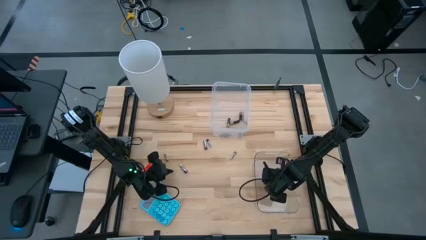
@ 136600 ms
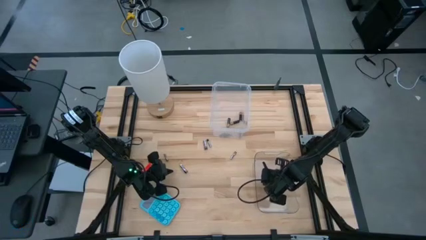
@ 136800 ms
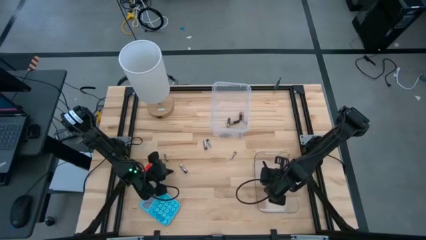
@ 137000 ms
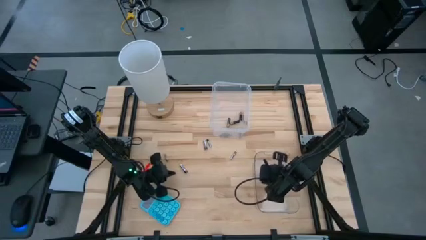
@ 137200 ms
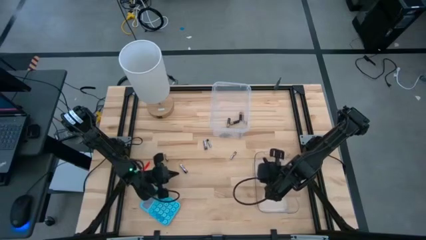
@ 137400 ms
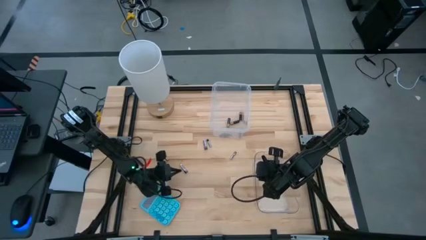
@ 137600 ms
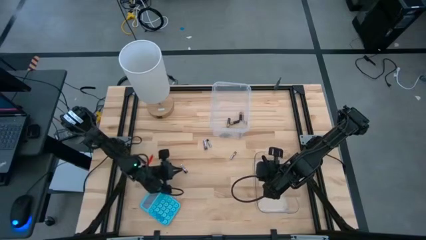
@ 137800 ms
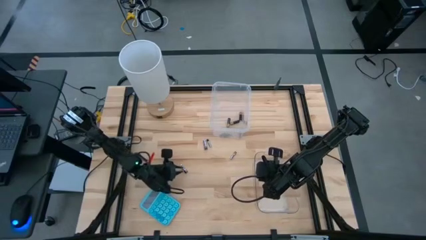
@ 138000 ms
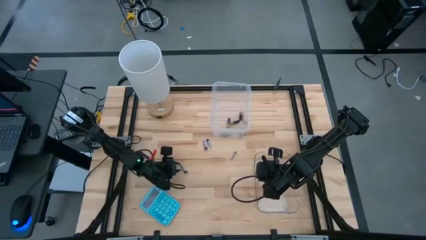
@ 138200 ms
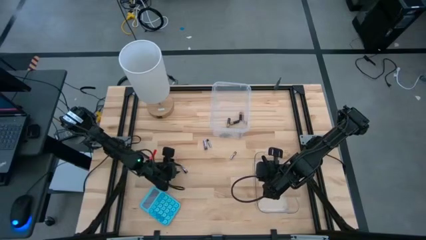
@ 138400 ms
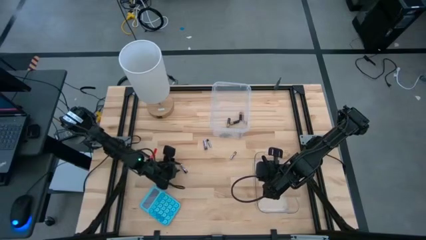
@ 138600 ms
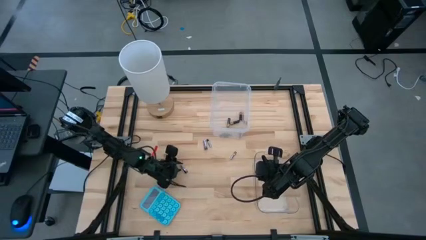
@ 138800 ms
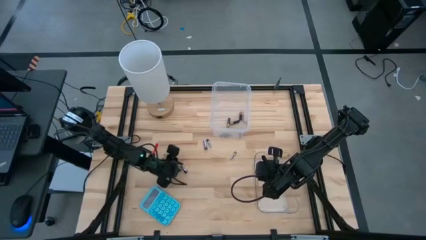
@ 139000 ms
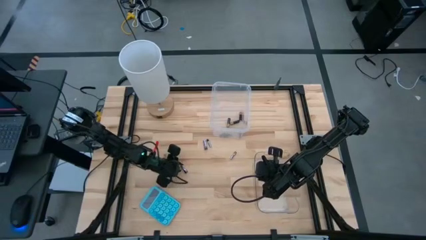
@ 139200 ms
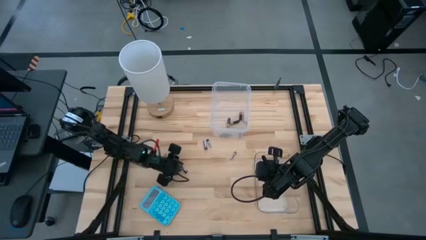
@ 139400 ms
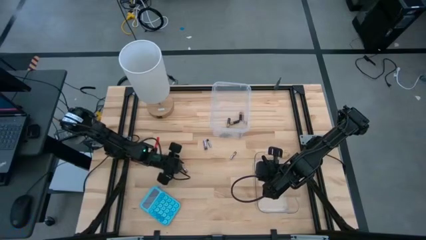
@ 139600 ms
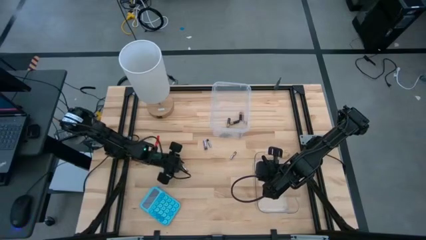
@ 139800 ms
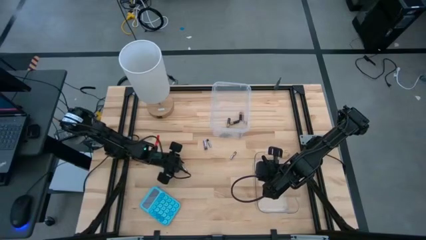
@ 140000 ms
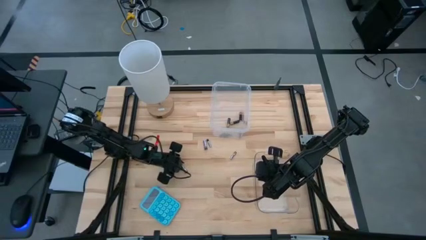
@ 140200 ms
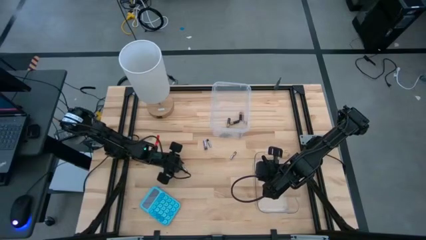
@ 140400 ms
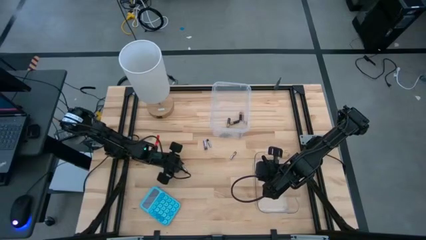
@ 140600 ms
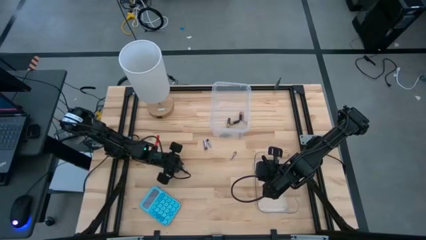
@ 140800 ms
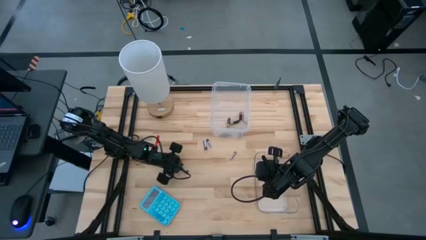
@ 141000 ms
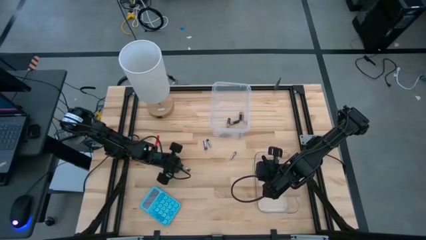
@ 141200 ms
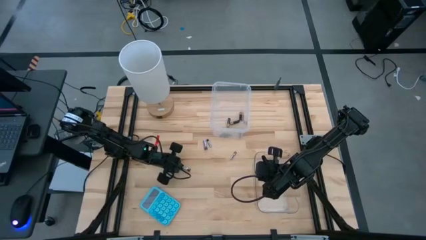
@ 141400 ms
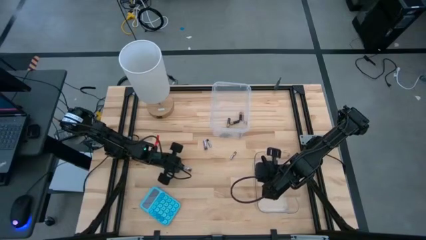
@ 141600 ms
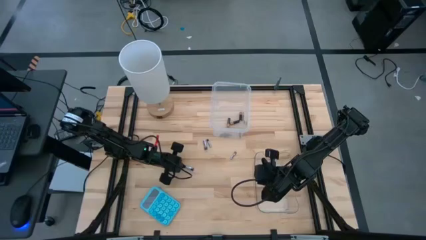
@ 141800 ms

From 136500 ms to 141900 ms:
Task: Sort batteries
Put the silver battery into the bottom transparent bin

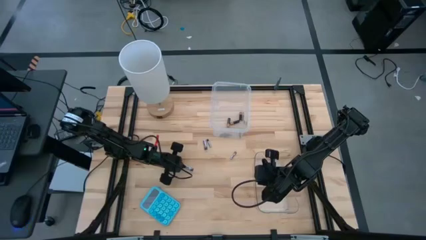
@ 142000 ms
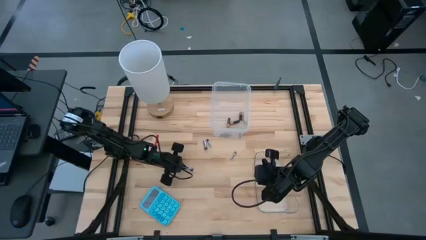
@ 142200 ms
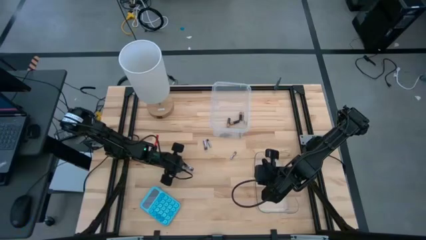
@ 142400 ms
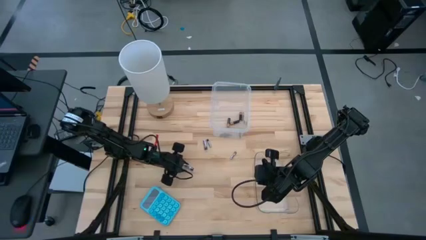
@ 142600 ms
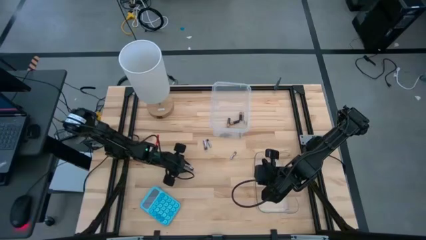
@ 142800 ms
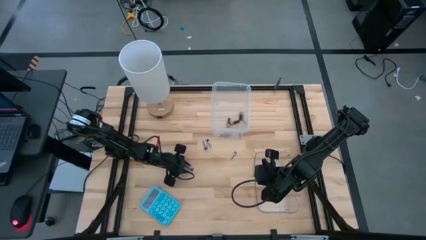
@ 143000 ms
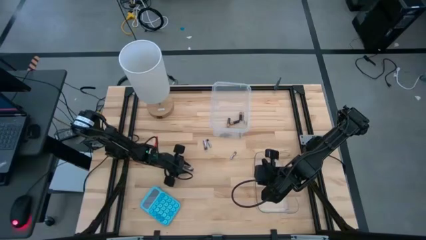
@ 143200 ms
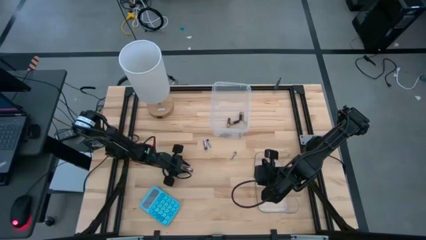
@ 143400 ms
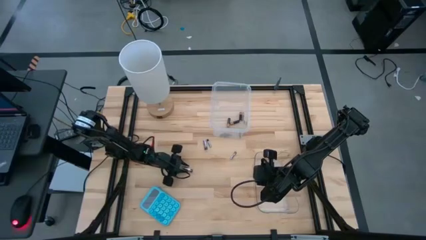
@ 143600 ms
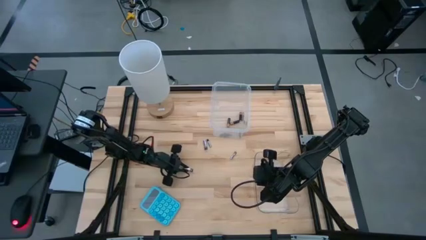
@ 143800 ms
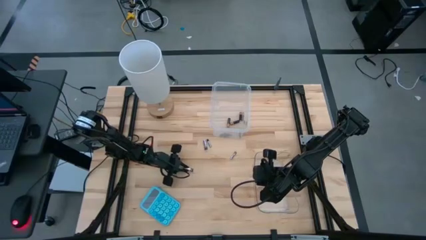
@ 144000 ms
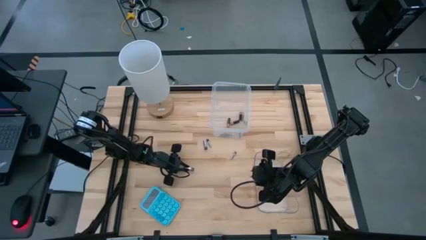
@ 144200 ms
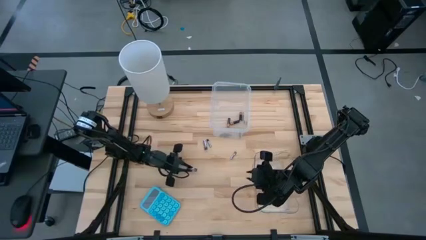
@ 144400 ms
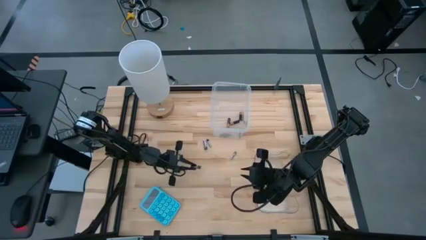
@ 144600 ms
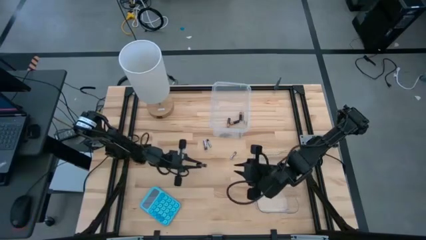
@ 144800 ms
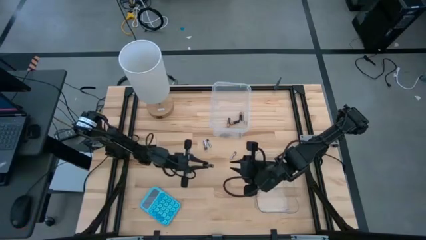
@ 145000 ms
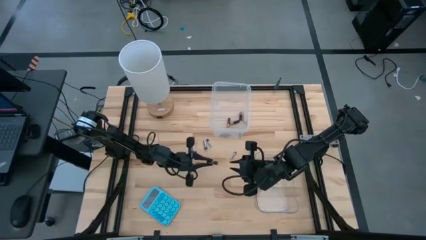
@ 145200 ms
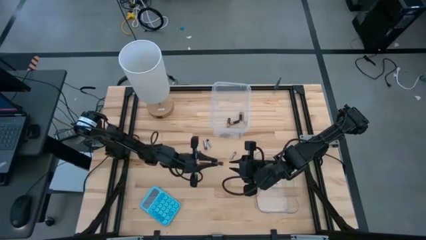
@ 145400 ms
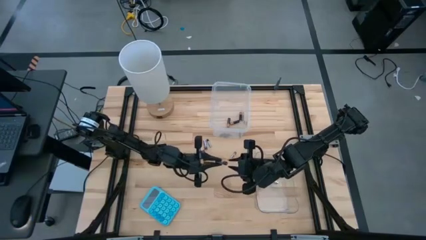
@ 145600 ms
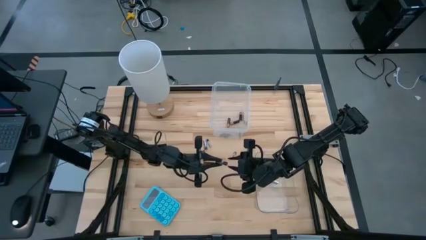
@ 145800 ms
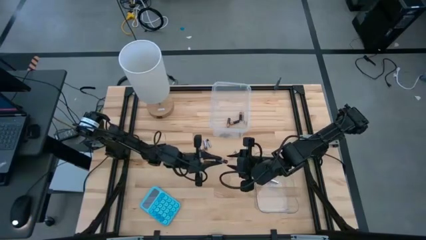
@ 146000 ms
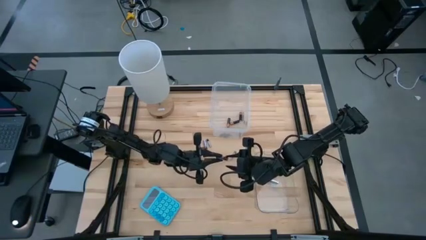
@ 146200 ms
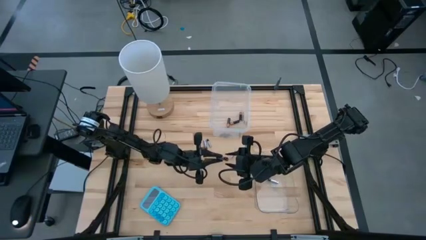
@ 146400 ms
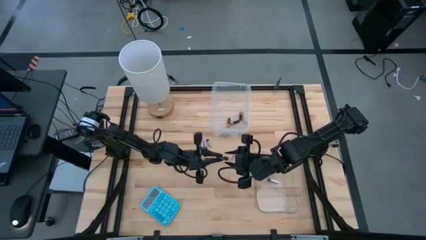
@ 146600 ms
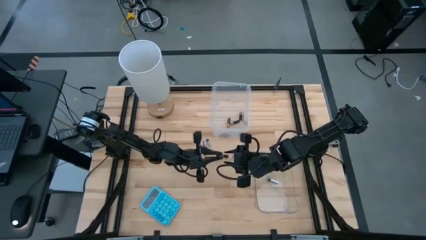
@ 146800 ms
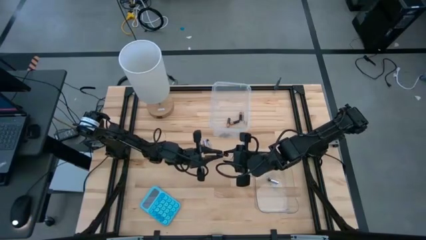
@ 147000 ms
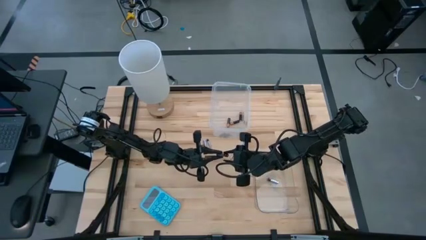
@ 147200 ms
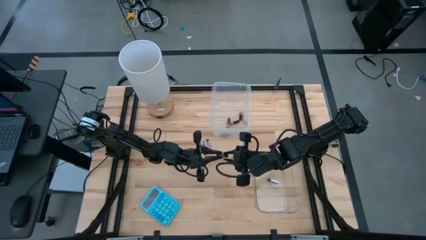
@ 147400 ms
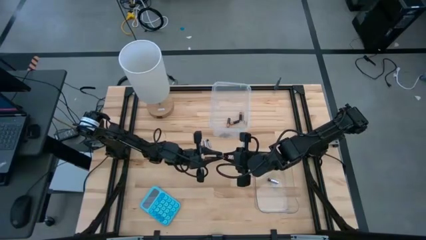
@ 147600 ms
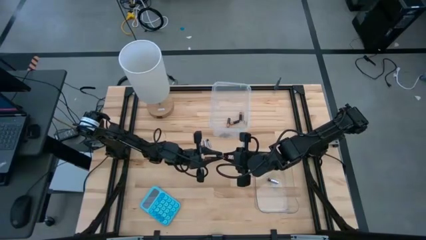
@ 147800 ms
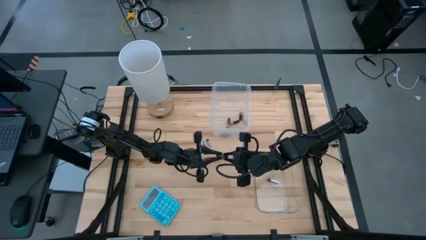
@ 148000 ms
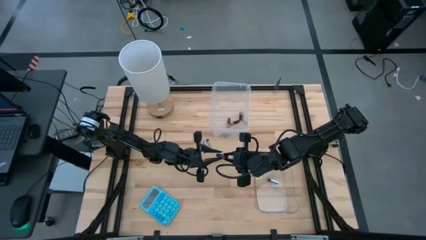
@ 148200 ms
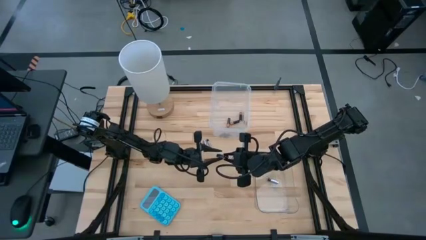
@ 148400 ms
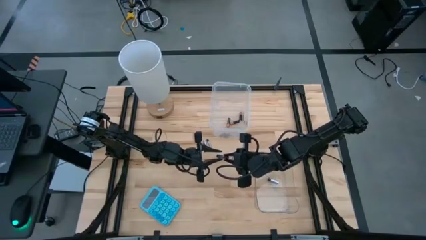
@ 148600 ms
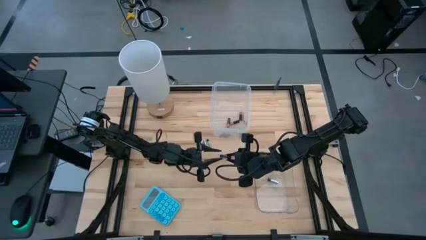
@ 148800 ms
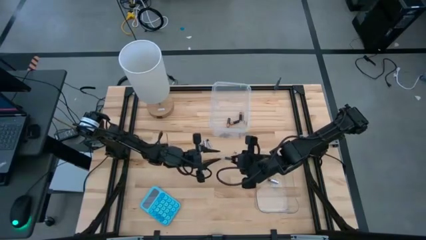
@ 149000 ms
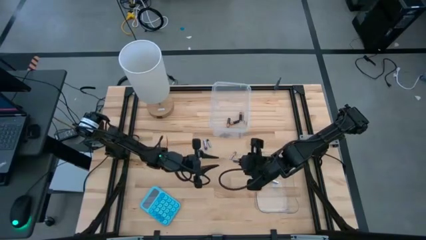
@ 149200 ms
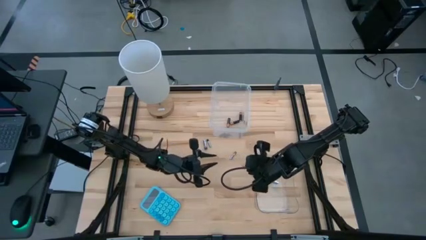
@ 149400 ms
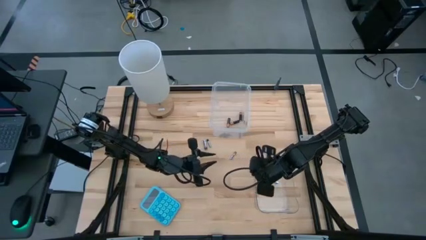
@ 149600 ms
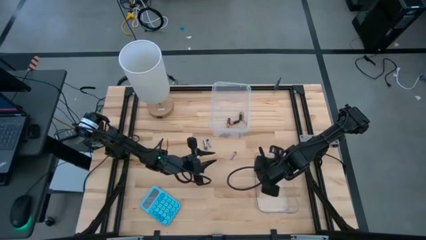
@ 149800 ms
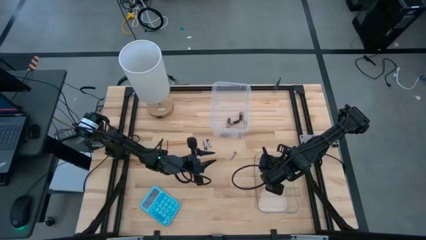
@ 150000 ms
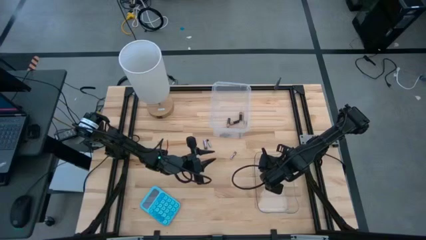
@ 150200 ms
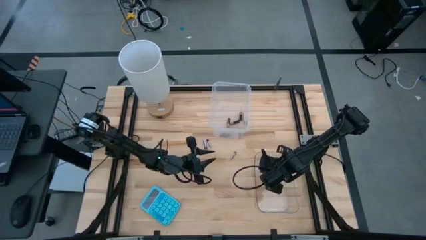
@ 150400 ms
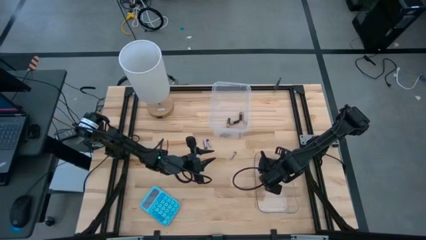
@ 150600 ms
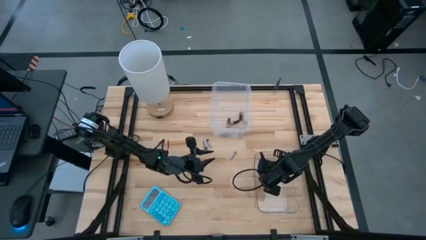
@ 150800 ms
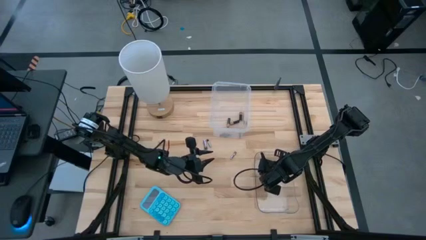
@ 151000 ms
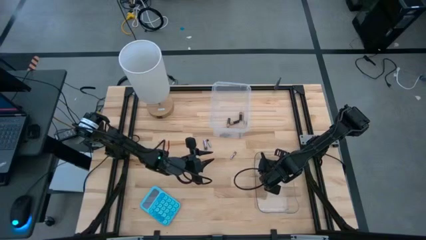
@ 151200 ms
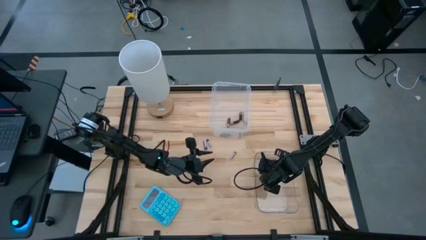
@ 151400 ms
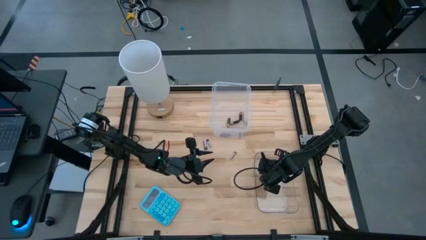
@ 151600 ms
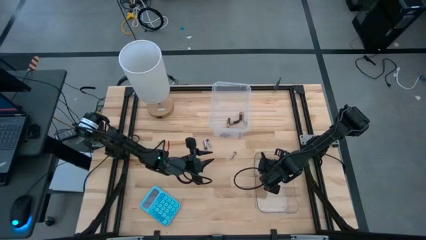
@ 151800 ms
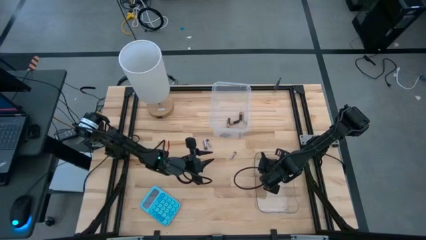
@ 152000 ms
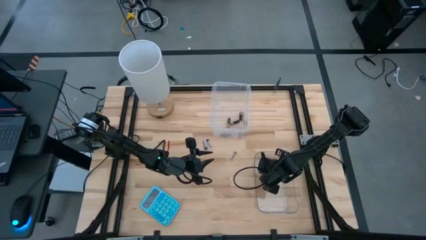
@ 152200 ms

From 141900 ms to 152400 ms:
Put the silver battery into the bottom transparent bin

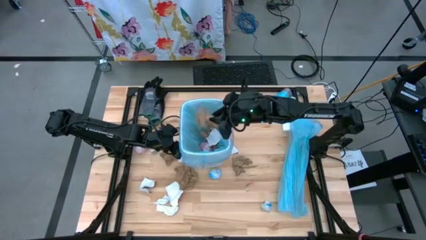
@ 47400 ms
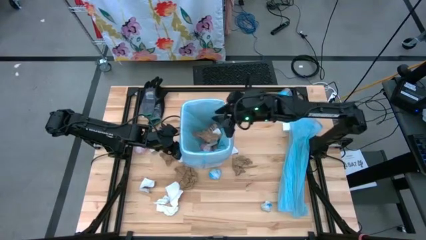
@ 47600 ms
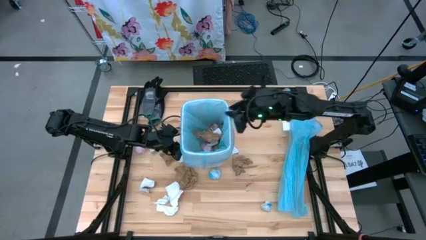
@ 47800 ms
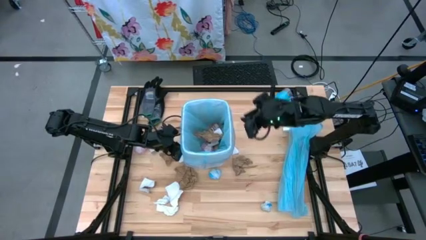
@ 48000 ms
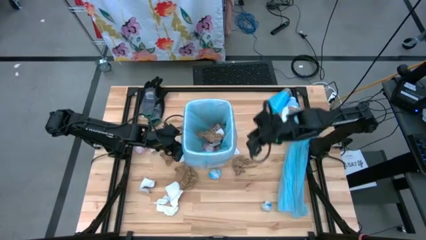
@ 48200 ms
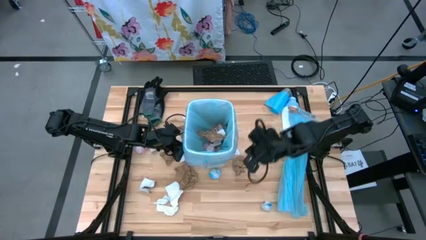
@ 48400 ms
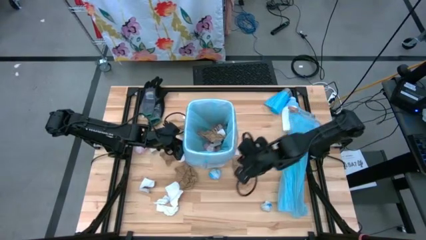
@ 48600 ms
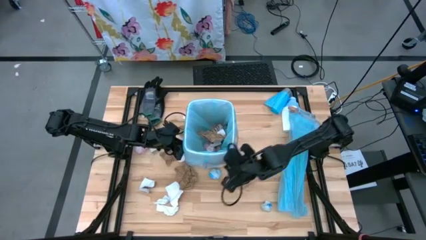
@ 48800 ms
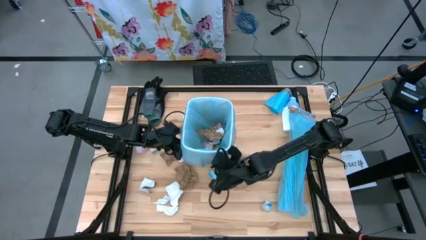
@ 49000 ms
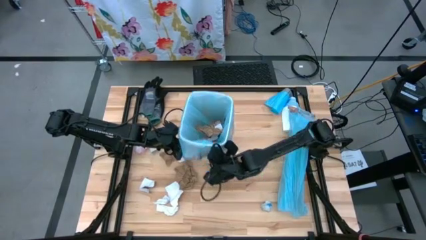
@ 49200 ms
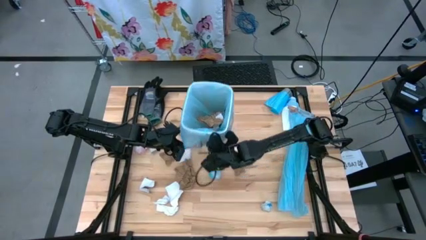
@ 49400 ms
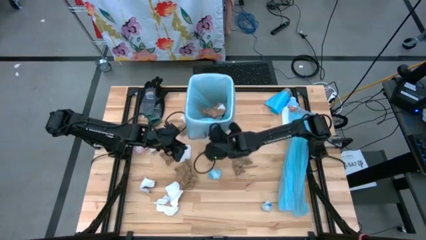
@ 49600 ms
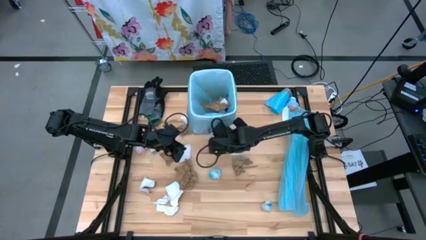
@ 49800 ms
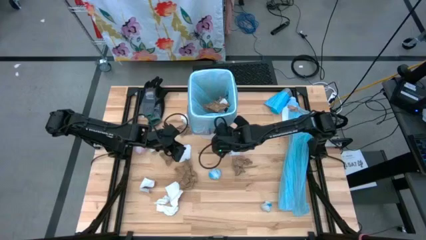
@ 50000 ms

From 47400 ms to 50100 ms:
Task: place trash/remove bag and relplace
Move the trash bin to the top of the table
